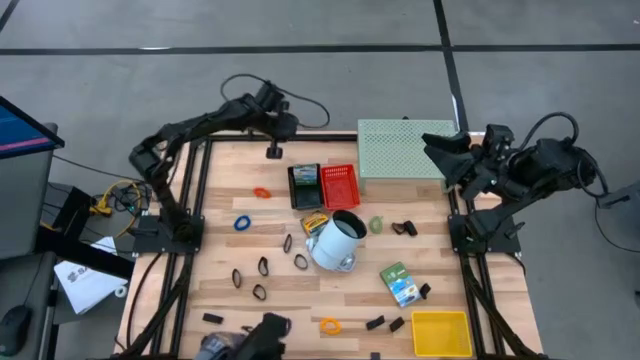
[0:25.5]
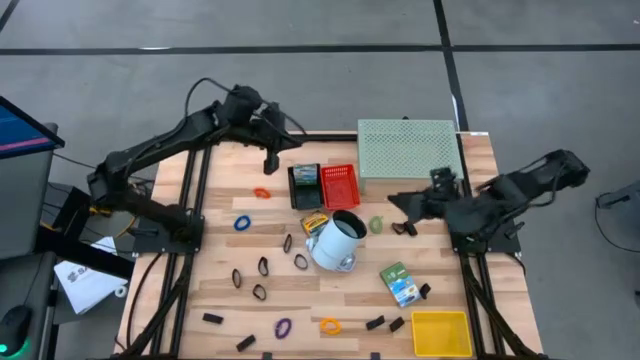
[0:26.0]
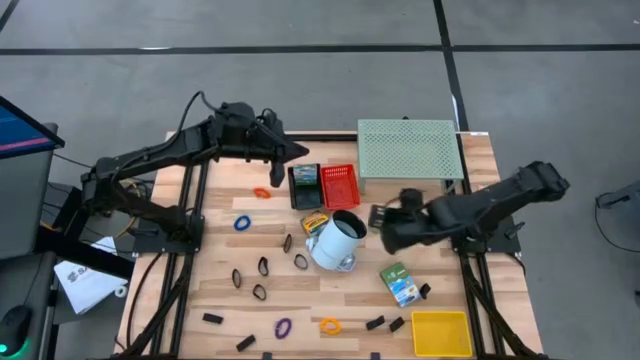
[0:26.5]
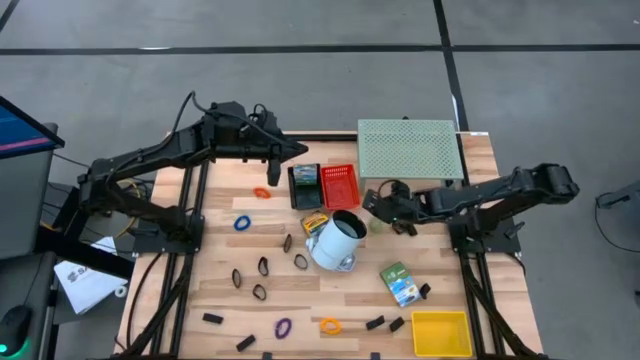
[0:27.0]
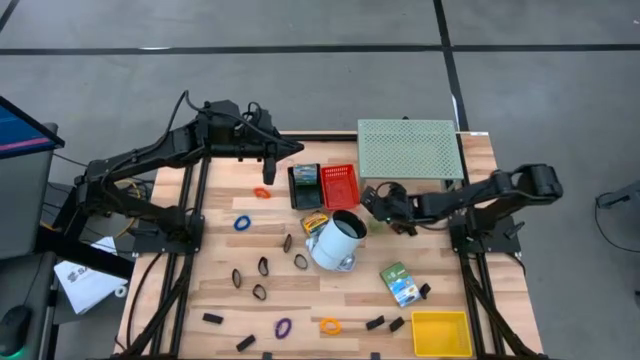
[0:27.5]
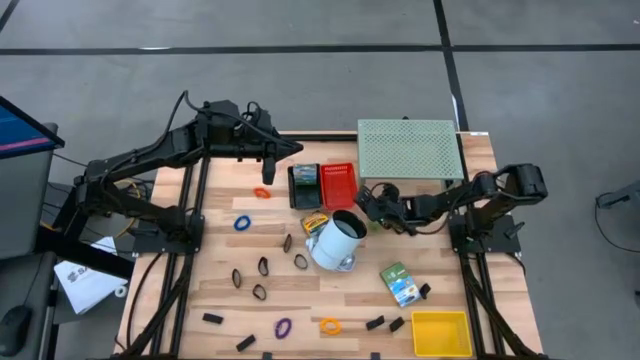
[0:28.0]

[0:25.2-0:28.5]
Task: Pick & Place Office Desk Supplies
Adjust the red bin

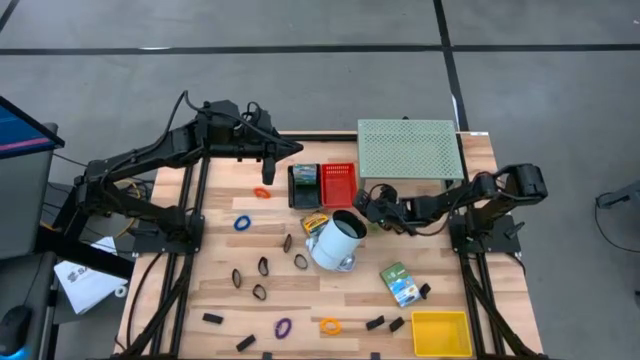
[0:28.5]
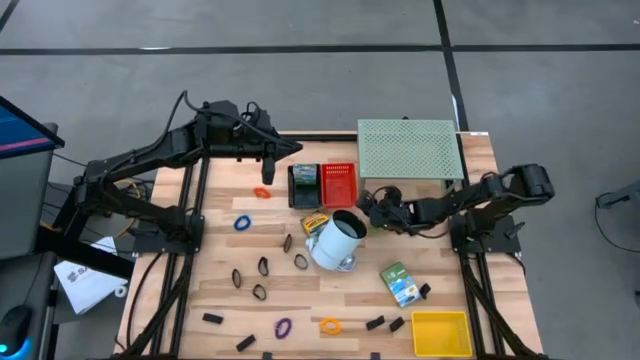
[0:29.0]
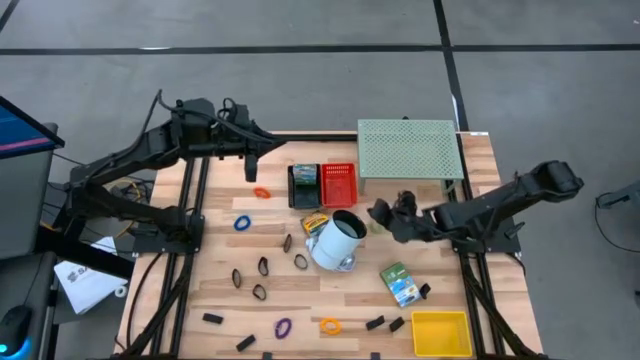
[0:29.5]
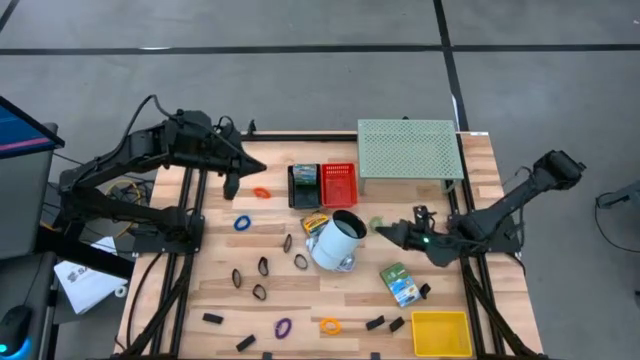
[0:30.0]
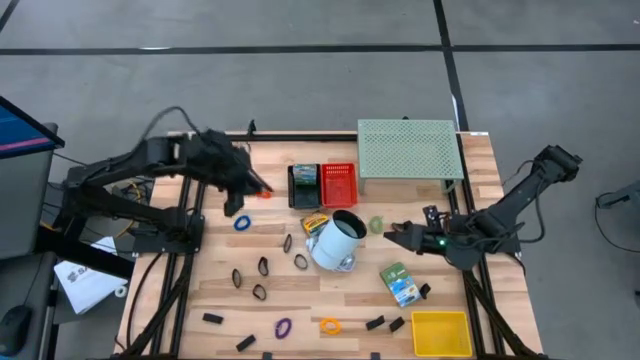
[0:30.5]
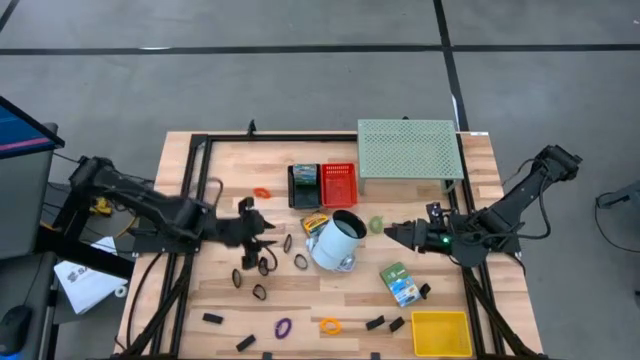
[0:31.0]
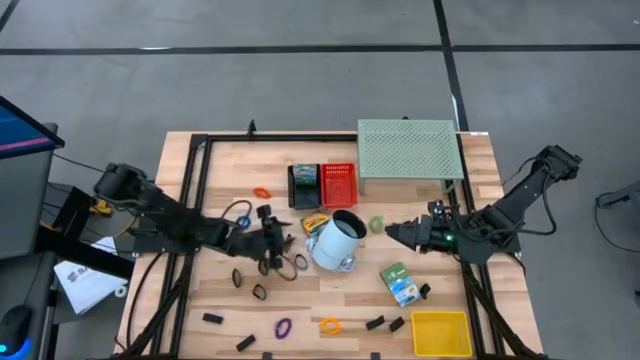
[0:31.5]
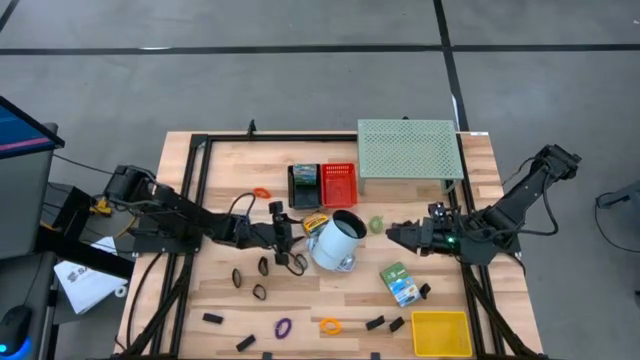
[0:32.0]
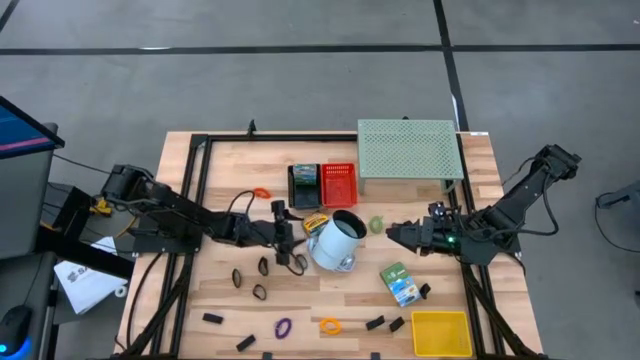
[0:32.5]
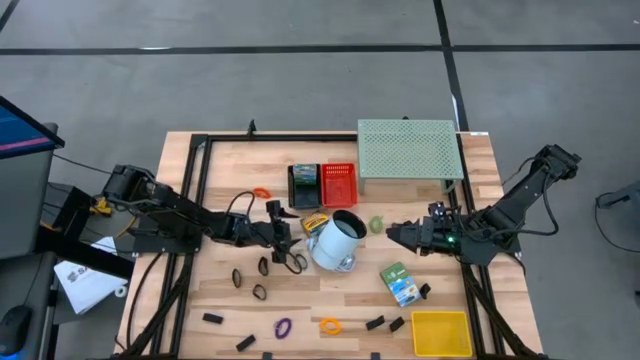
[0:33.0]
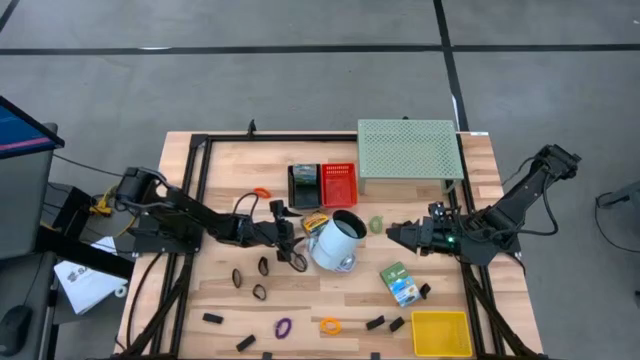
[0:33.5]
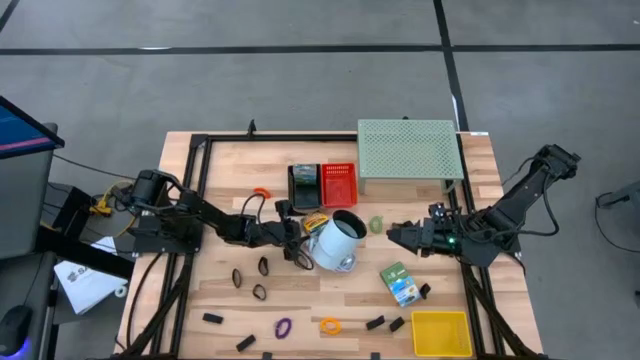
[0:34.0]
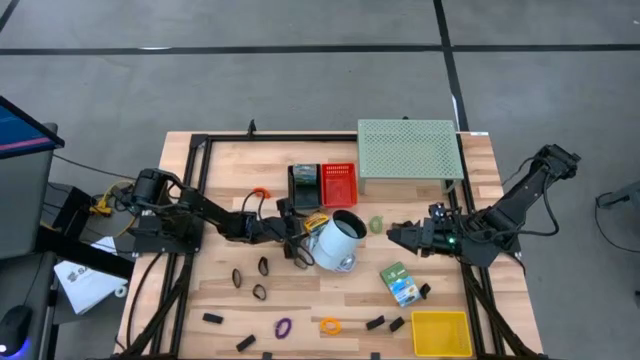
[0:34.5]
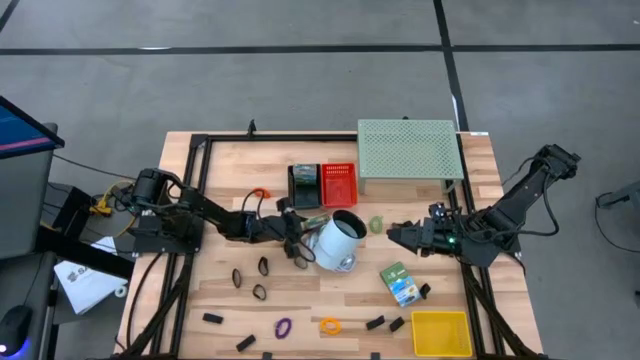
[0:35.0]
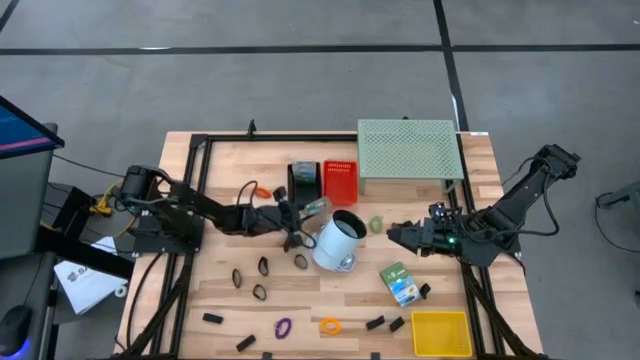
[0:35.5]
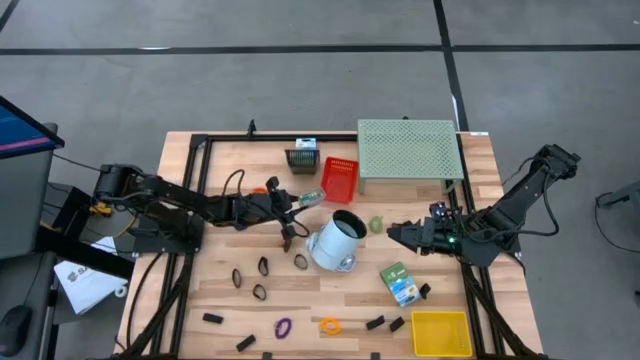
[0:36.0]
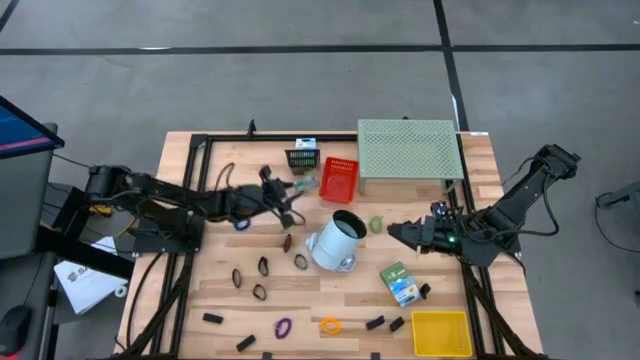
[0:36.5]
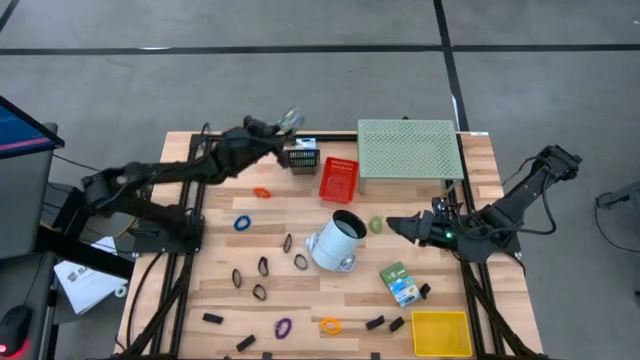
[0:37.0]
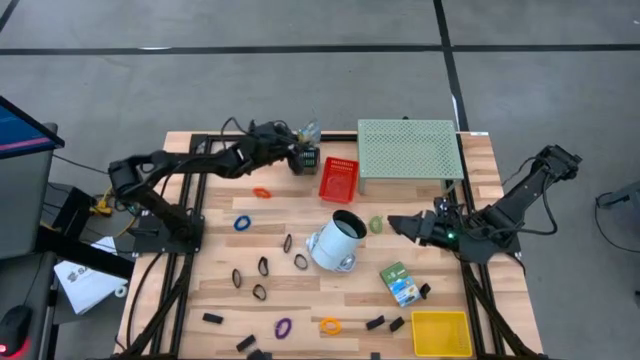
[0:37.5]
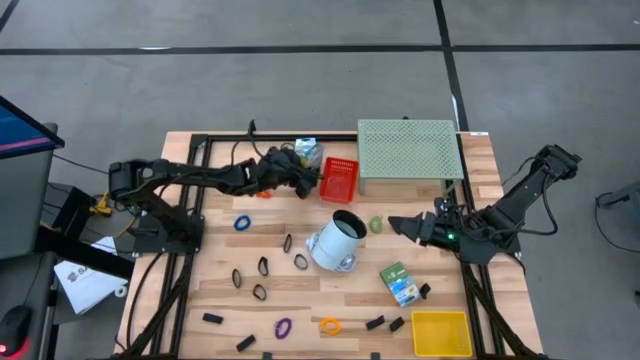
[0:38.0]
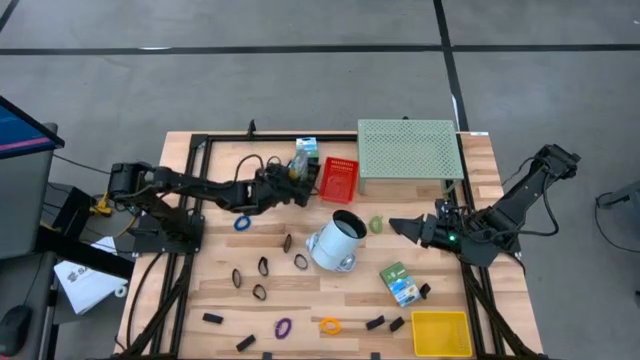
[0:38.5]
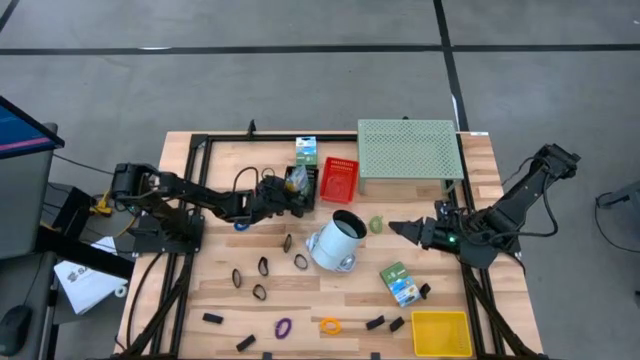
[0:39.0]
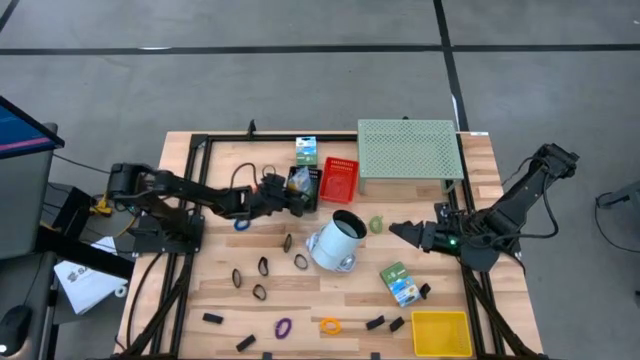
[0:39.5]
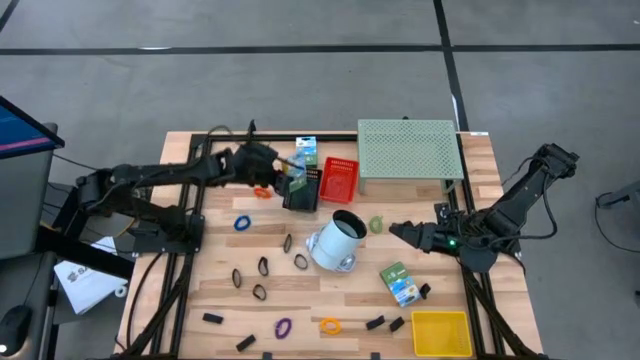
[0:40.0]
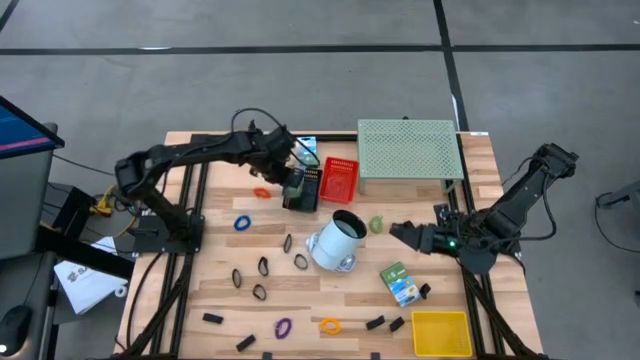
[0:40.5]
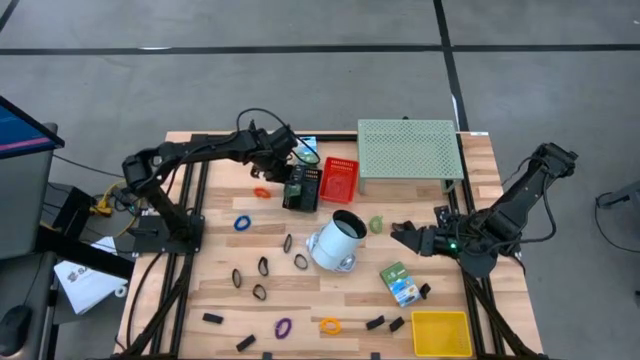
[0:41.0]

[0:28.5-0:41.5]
Put the crayon box into the left black bin

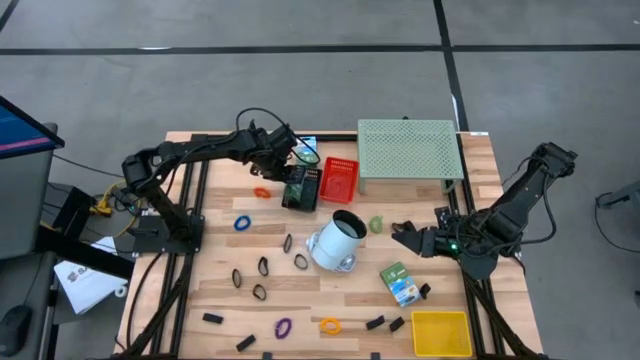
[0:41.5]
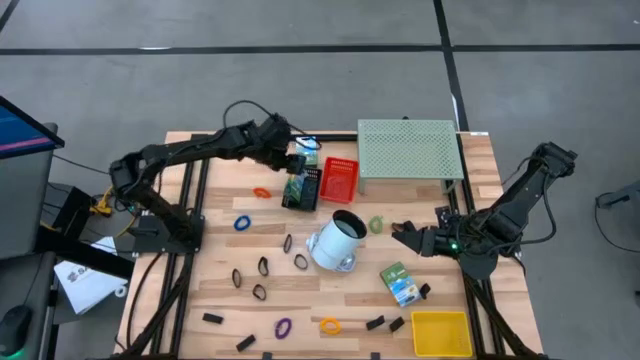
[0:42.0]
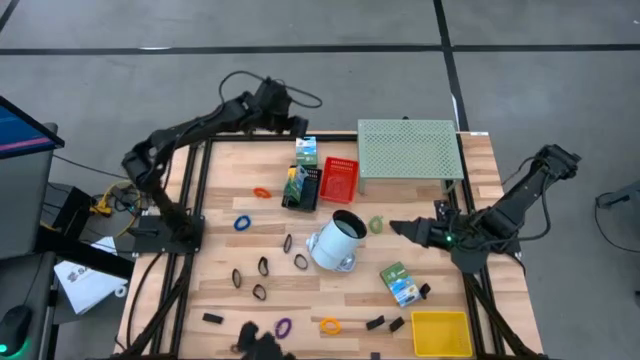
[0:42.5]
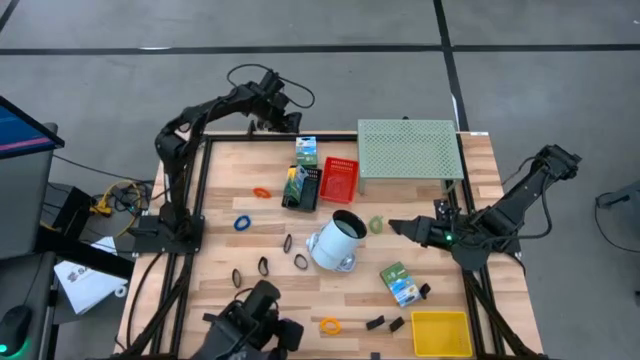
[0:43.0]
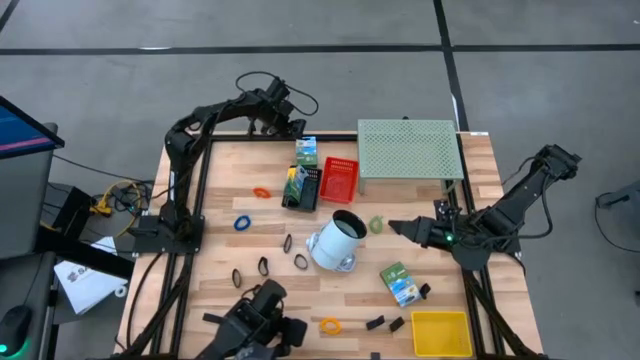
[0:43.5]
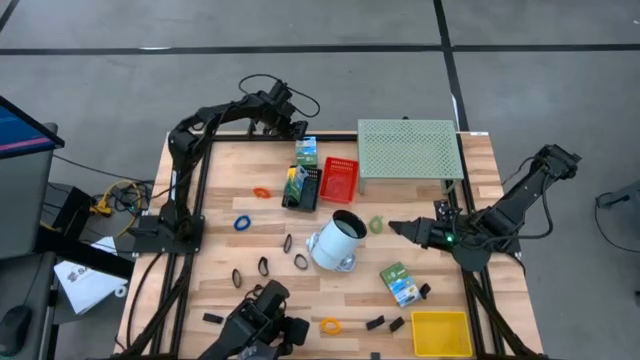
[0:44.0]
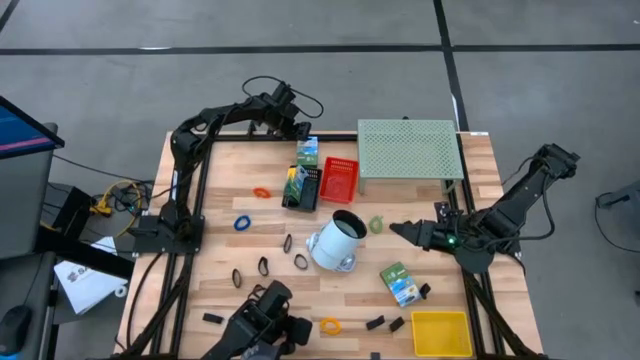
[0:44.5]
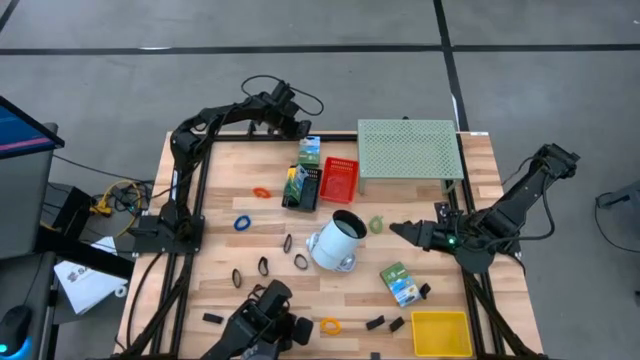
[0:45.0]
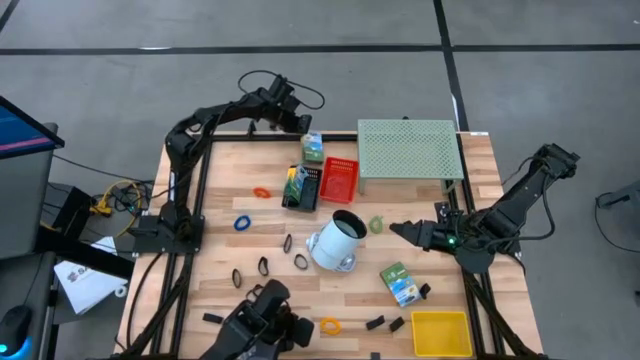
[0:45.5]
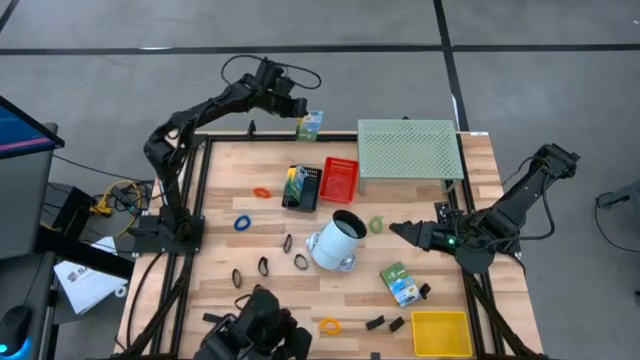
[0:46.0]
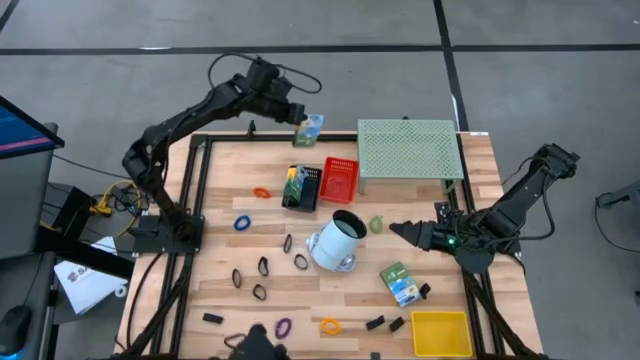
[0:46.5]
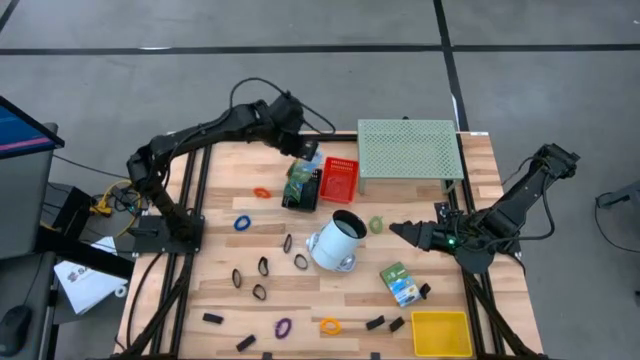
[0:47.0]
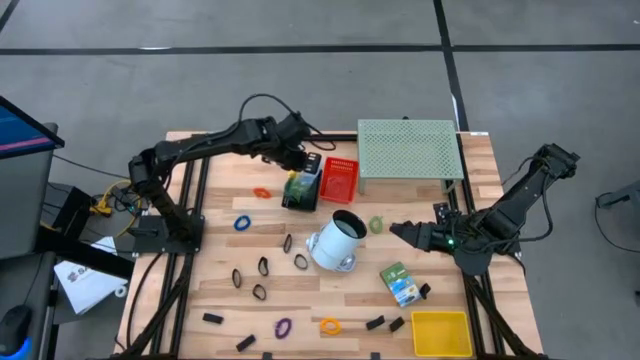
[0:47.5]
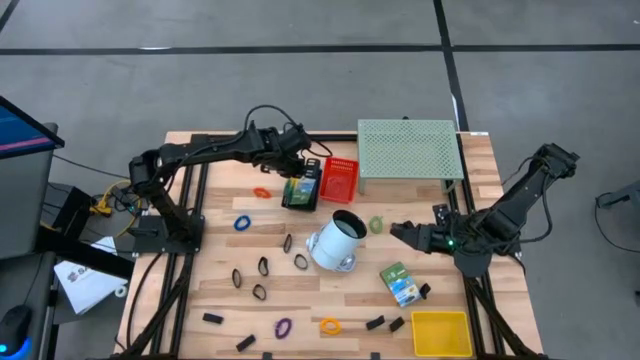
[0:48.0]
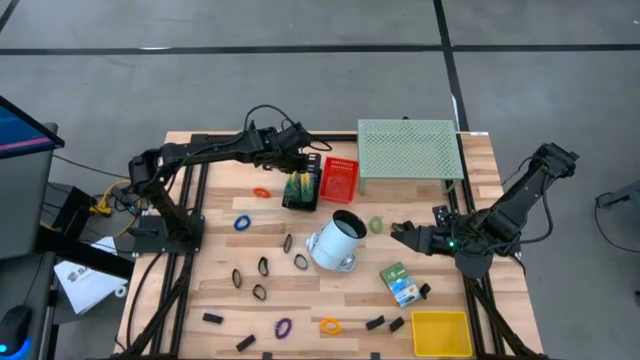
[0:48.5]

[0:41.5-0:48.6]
Put the crayon box into the black bin
